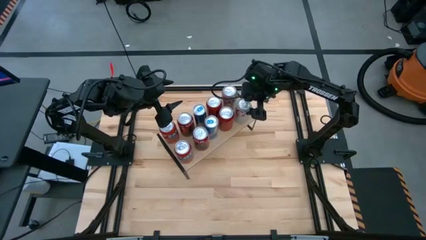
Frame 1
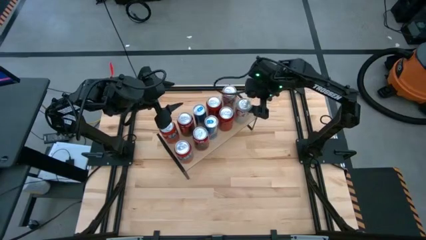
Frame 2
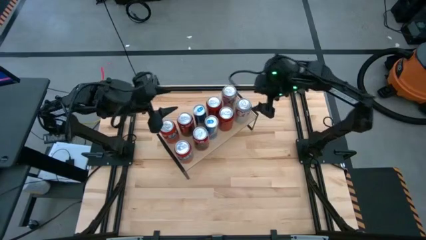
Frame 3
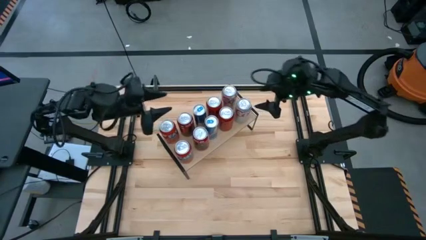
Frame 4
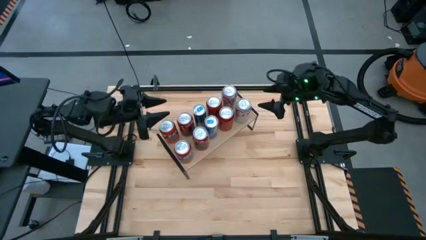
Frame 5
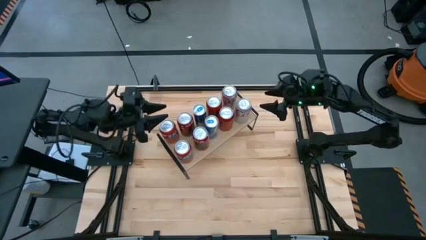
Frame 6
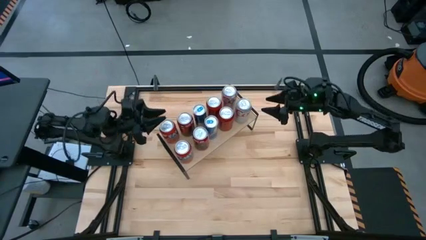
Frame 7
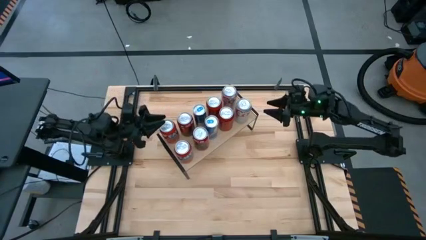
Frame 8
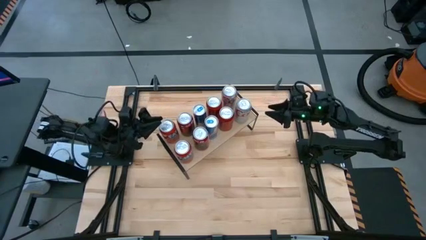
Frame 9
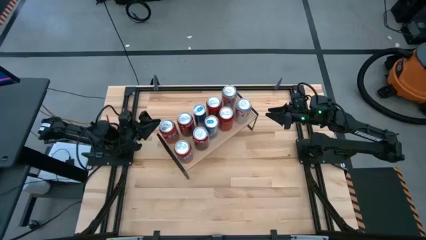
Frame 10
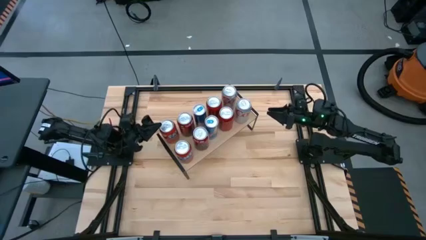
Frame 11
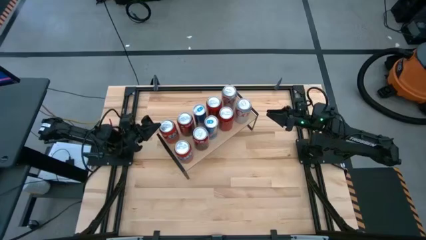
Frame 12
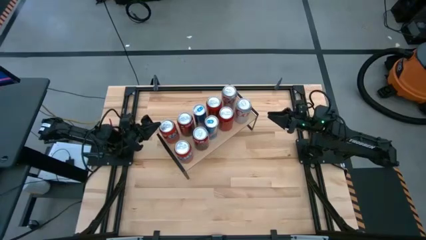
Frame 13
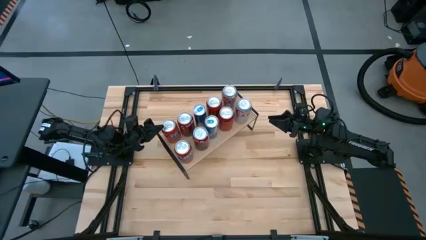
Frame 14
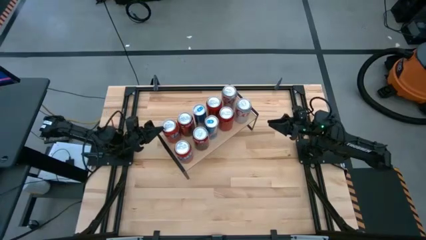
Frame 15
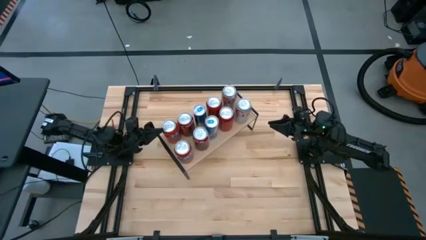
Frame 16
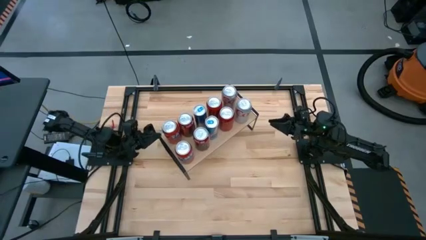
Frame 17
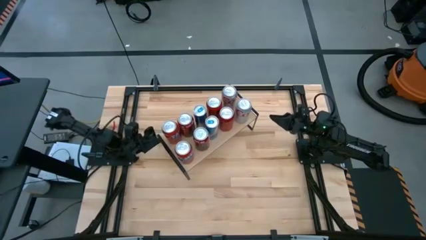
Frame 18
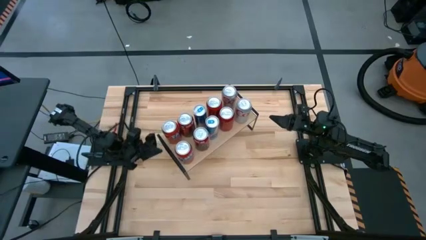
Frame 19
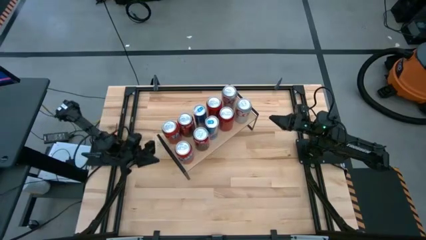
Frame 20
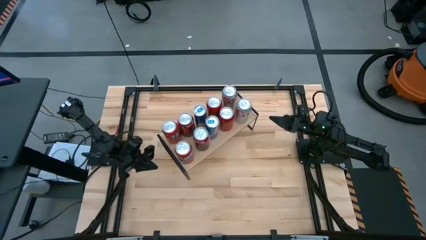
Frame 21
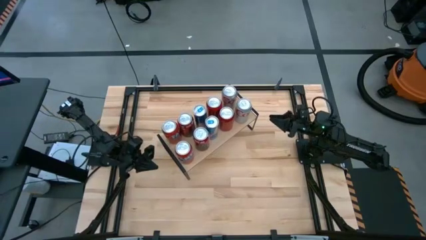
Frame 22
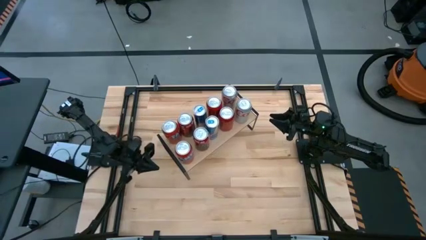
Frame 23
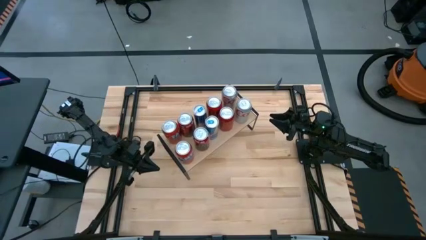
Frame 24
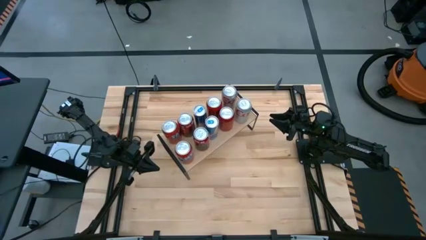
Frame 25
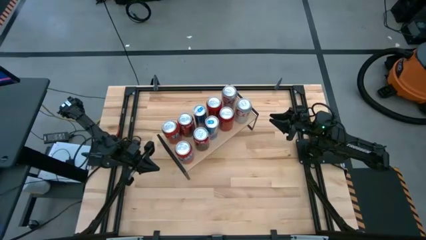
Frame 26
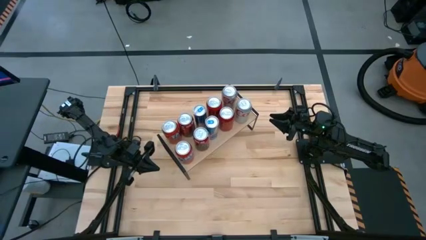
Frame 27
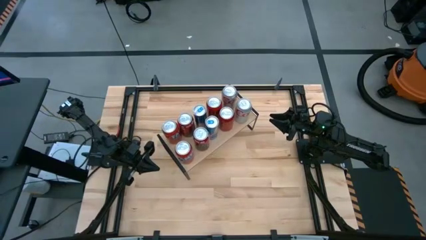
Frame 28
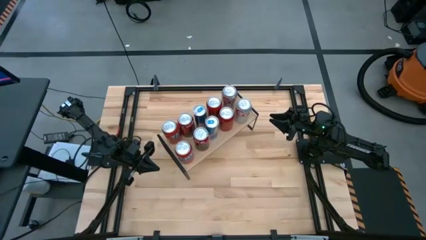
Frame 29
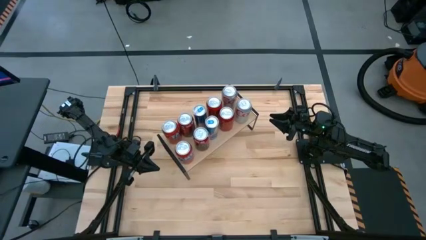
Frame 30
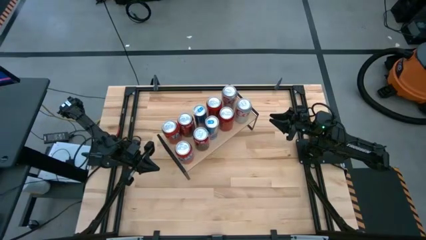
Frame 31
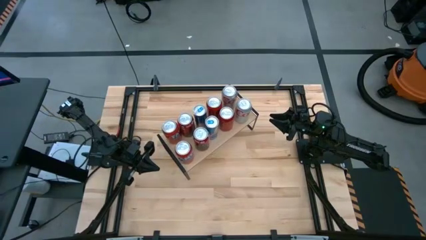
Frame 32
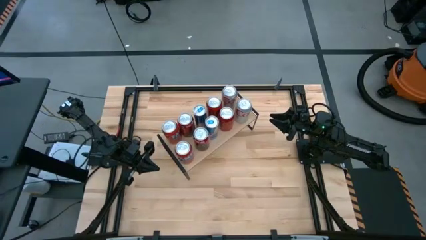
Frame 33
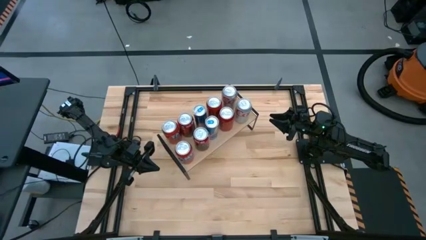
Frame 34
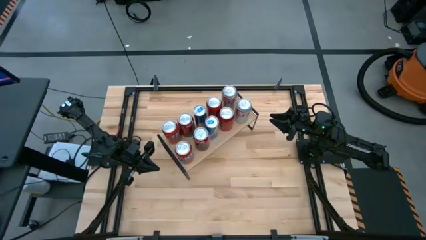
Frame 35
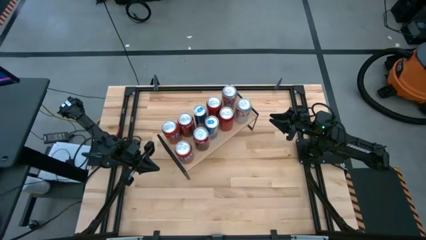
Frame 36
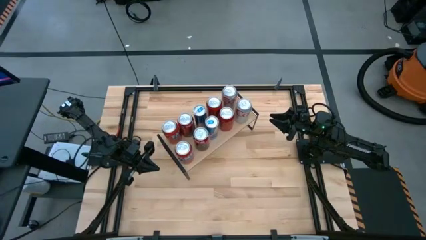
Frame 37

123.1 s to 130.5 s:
Task: Place canned beverage on shelf
Return to Home Position

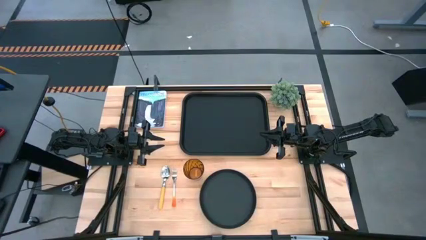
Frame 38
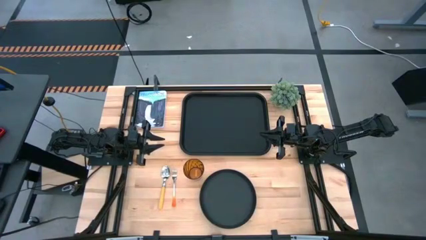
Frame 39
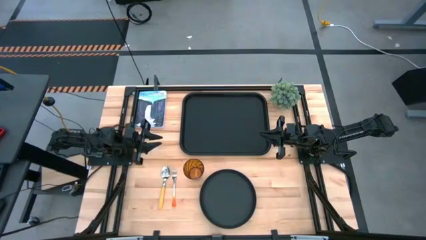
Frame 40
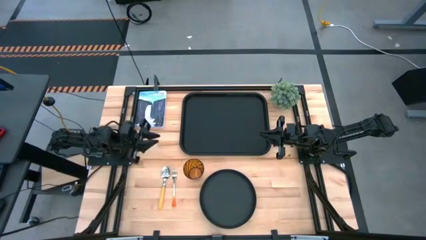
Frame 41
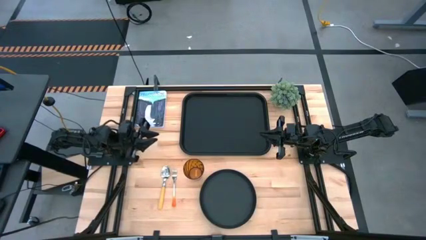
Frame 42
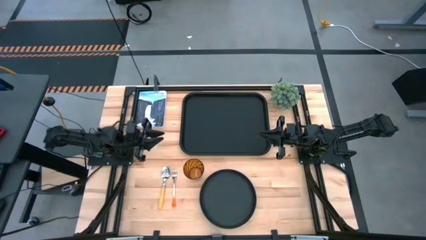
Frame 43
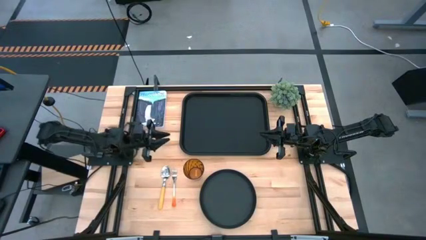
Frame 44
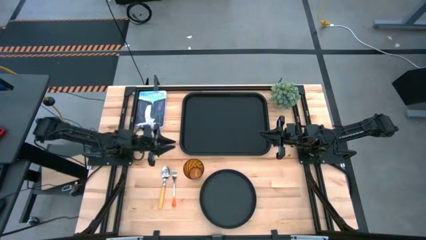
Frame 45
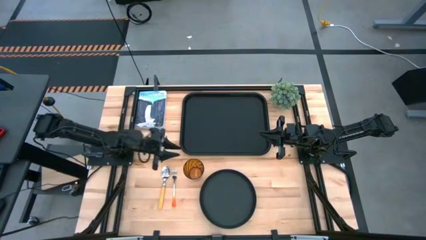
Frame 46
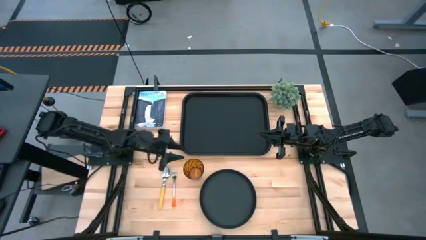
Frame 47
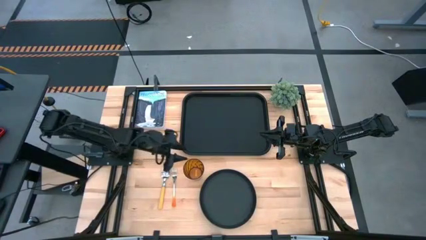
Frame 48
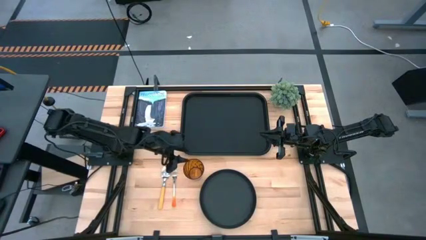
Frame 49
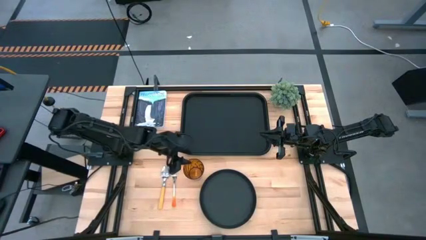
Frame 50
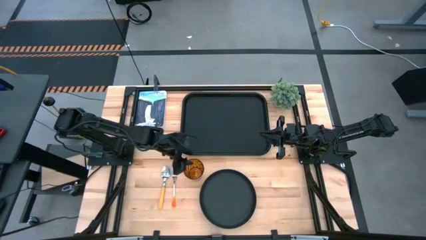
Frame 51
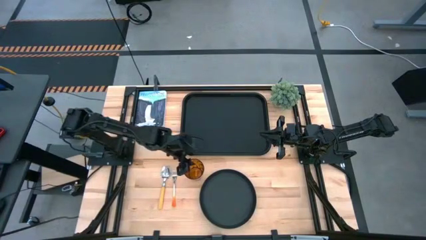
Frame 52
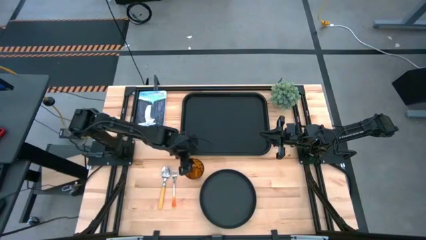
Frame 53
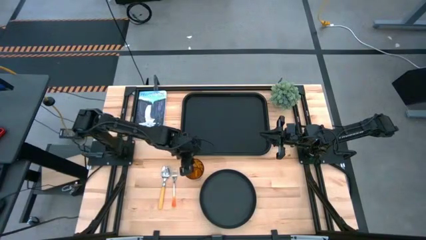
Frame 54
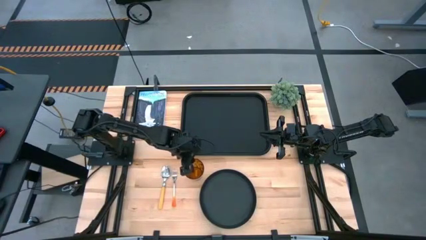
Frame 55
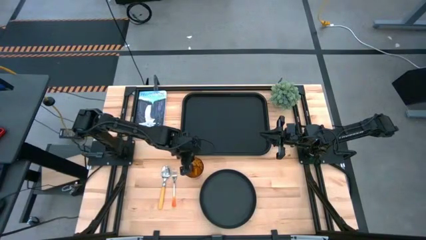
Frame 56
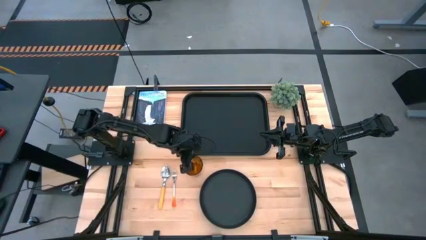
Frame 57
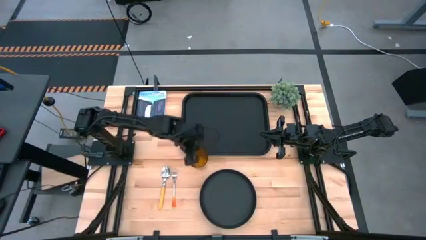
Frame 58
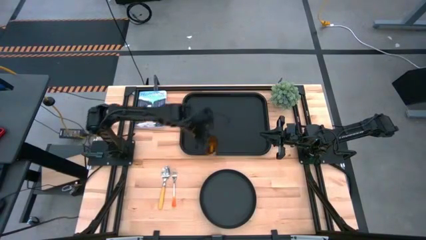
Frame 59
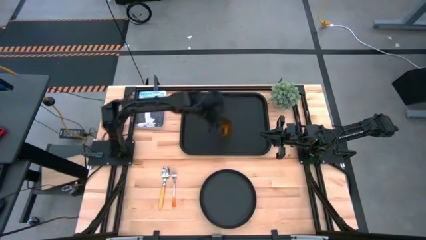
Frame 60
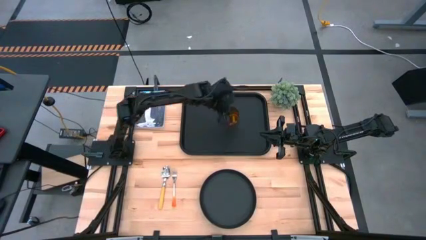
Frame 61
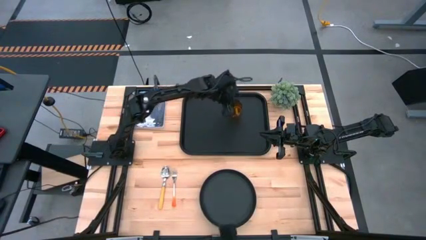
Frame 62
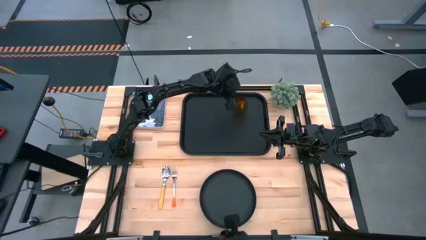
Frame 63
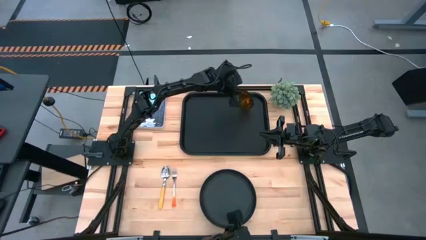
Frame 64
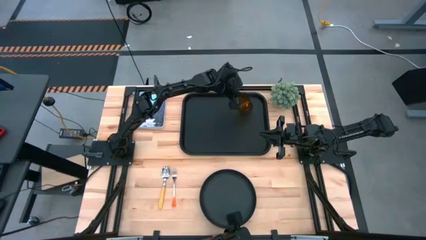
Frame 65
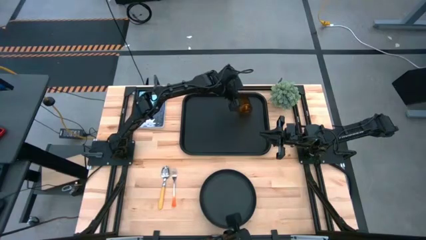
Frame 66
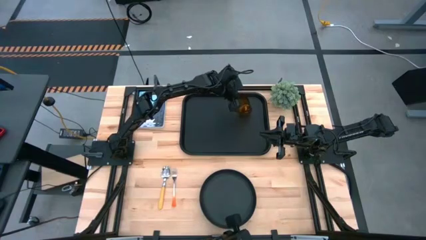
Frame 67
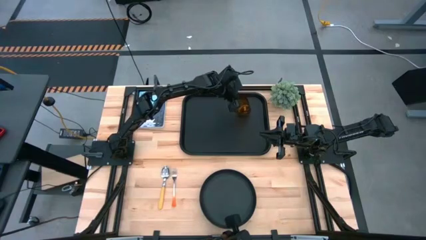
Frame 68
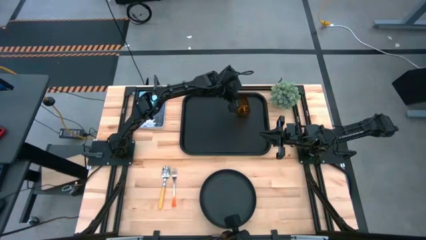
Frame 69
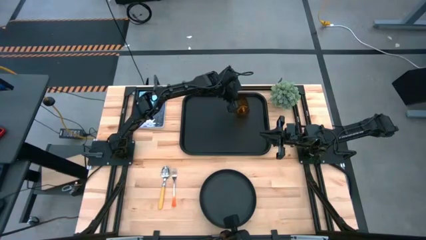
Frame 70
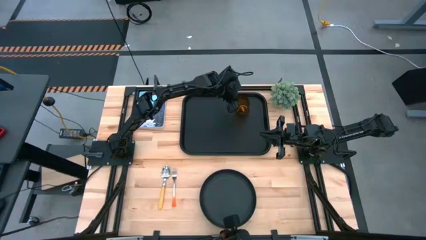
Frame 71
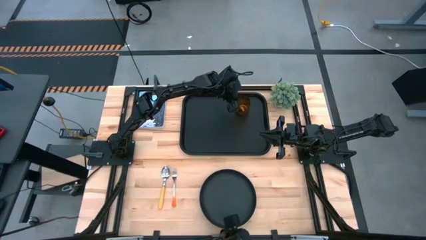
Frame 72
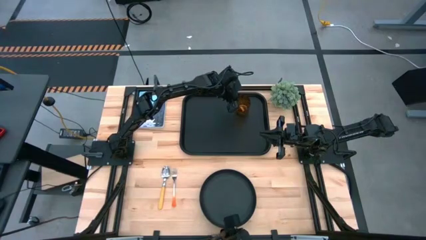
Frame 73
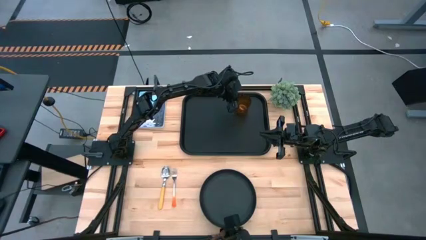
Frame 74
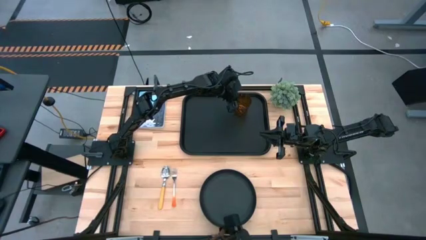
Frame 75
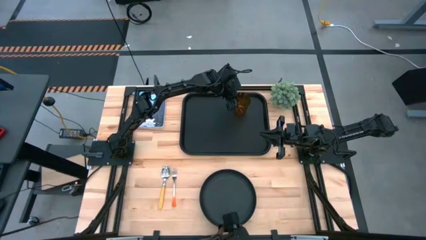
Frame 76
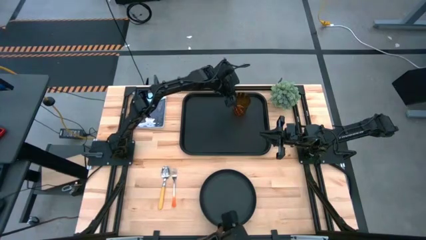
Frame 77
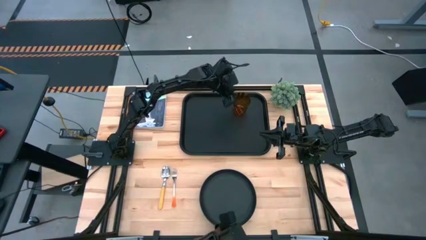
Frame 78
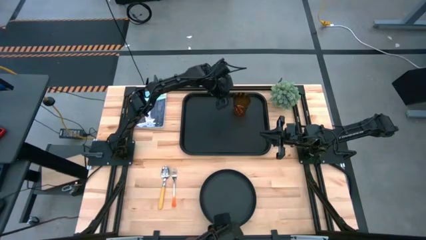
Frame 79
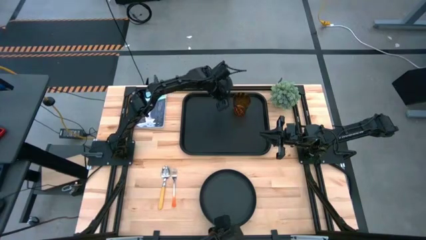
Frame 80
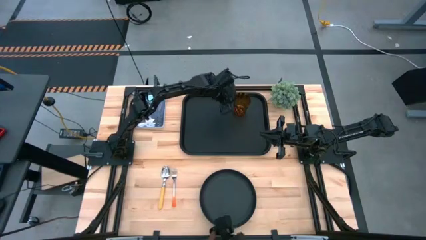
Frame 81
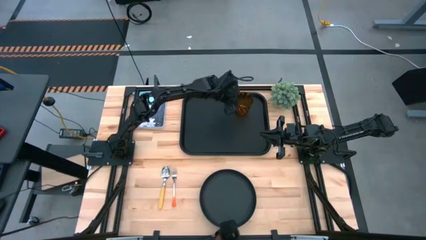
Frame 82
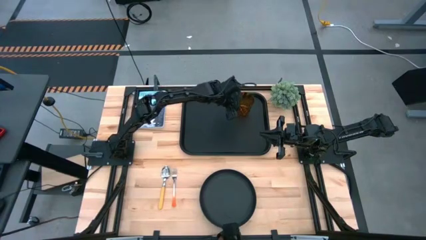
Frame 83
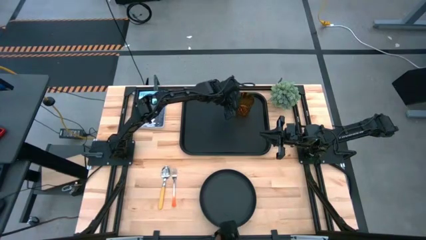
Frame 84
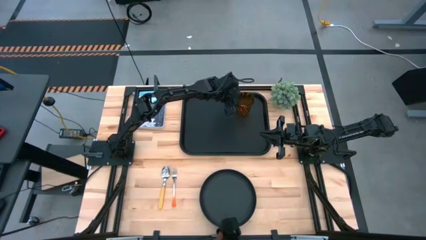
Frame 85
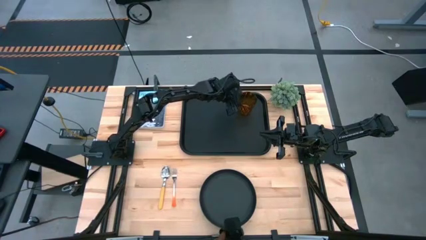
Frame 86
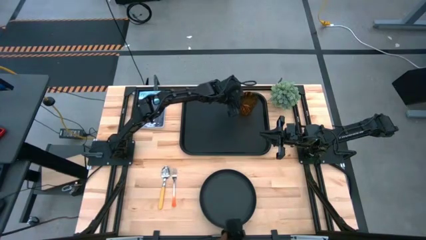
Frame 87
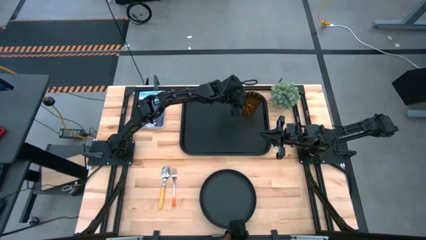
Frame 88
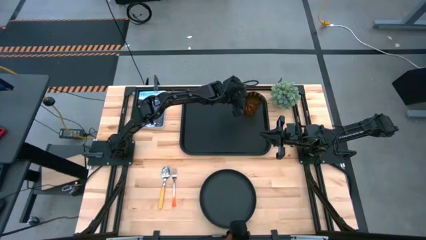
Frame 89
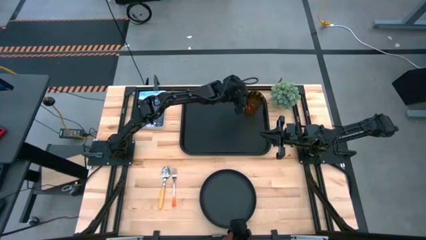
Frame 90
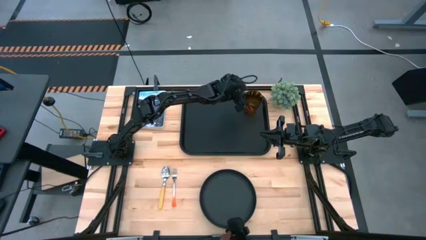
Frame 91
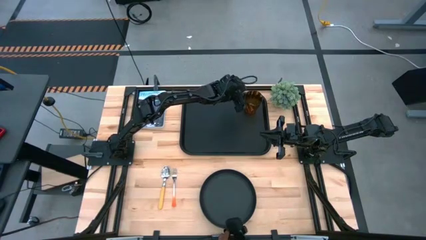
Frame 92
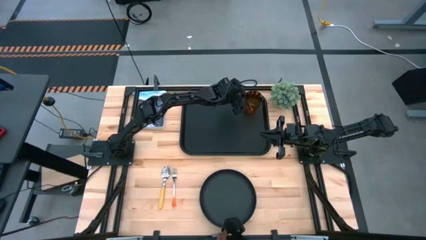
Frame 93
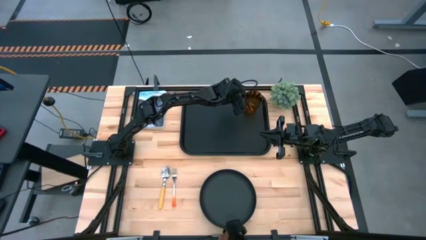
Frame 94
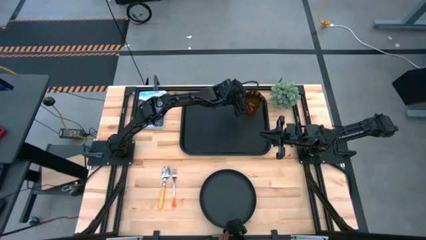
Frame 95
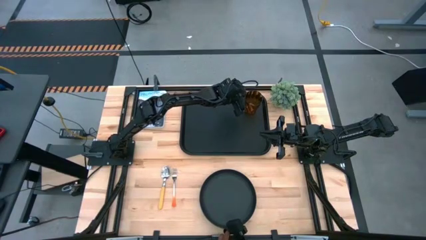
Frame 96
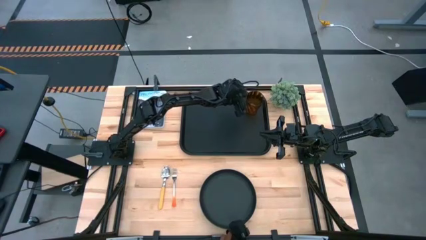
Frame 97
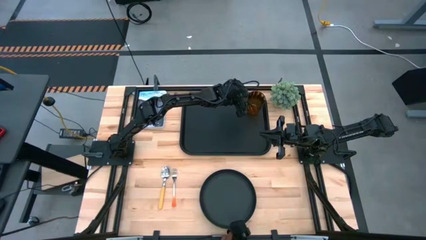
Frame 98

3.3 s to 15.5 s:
Task: Pick and place plate/cup/fork/spoon on tray
Put the brown glass on the top right of the black serving tray
